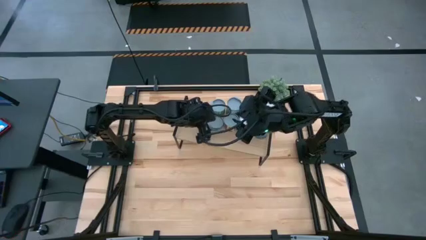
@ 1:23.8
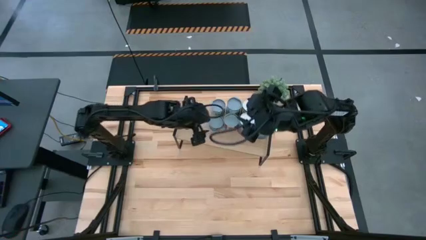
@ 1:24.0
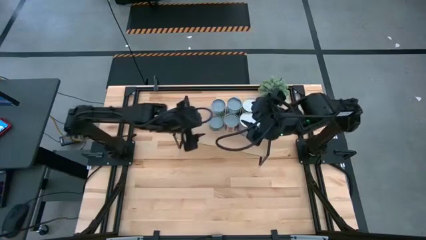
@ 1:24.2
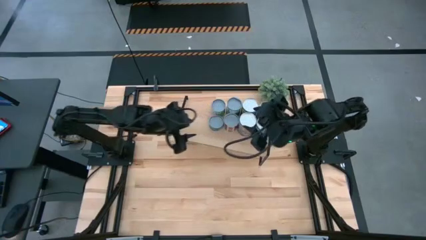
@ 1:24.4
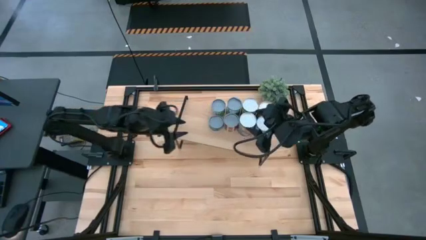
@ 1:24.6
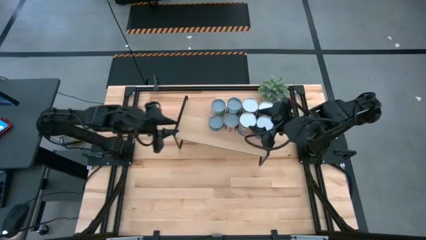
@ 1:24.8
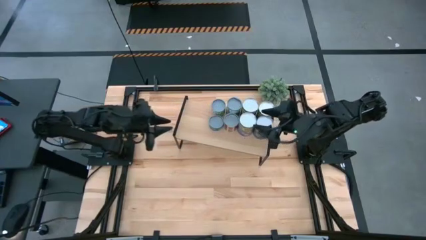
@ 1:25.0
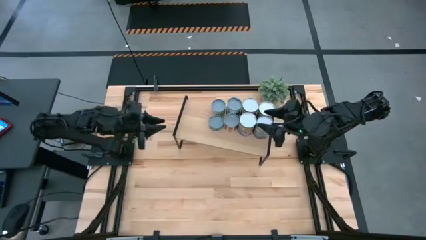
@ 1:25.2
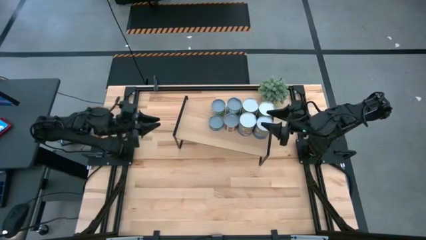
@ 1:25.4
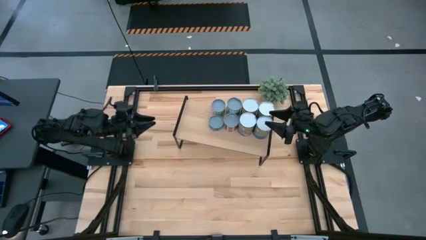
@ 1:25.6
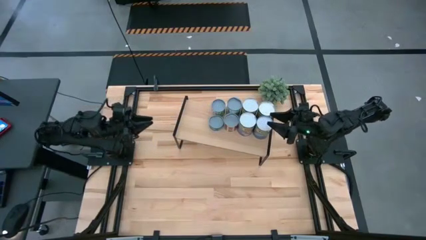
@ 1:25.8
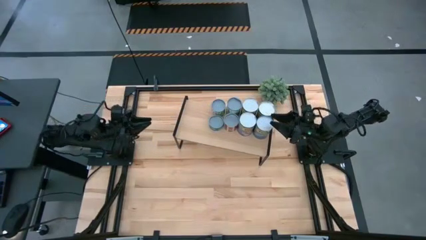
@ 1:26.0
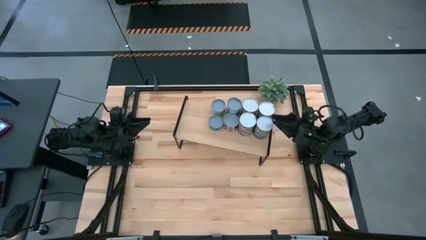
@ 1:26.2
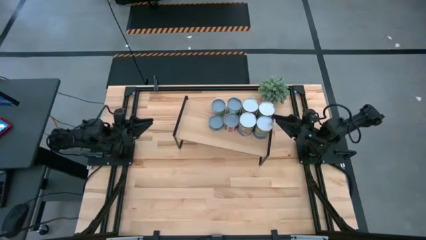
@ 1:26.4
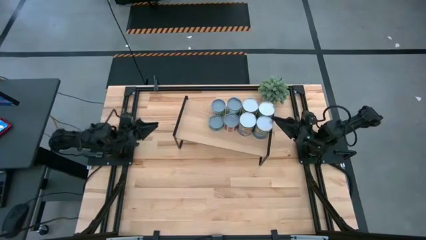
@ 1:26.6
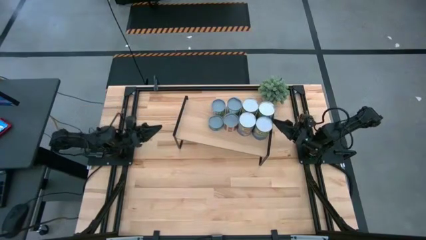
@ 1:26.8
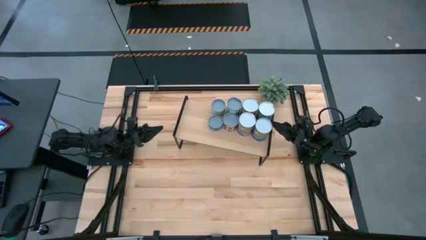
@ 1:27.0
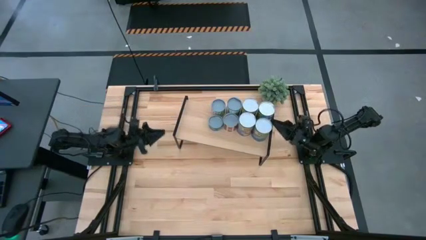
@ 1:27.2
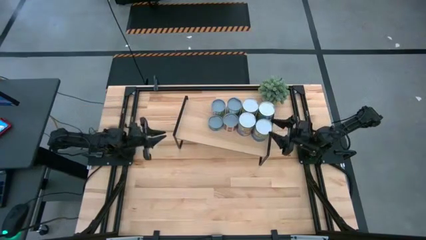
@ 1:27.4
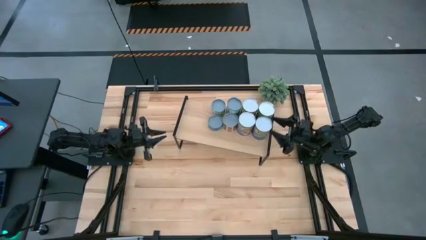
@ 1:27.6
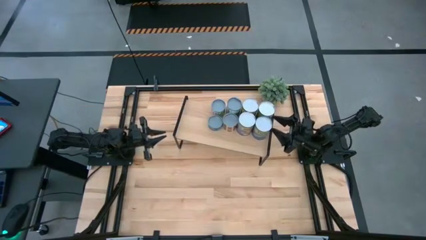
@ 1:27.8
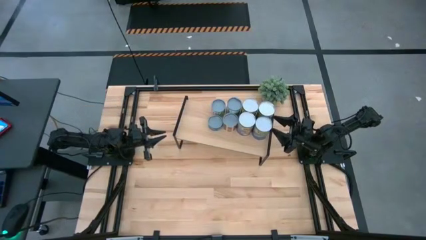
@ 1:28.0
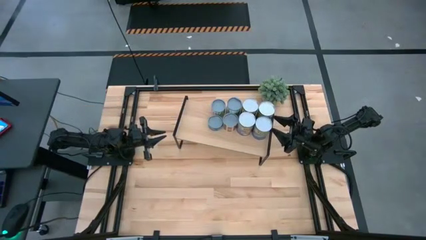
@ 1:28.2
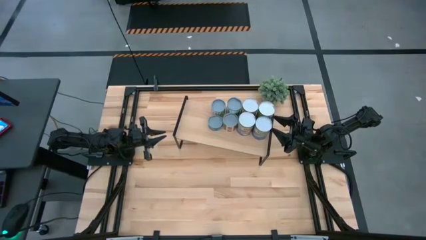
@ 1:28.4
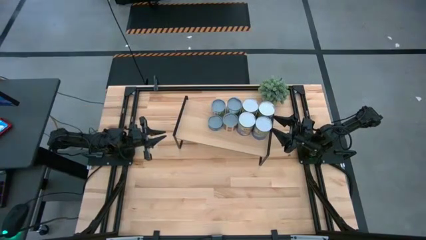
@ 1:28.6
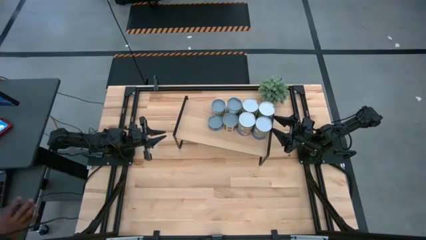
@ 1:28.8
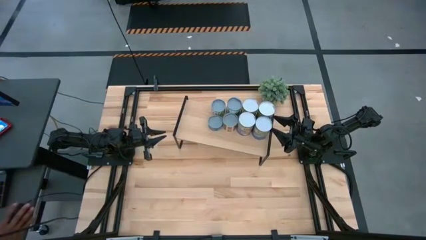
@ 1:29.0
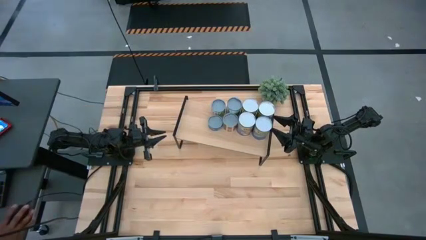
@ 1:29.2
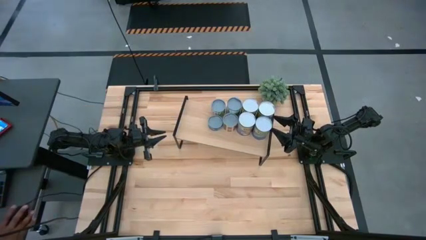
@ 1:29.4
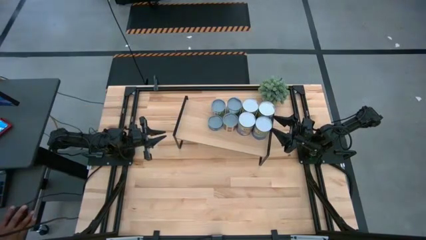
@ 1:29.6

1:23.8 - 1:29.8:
Task: Pick and place cans onto a shelf
Return to Home Position

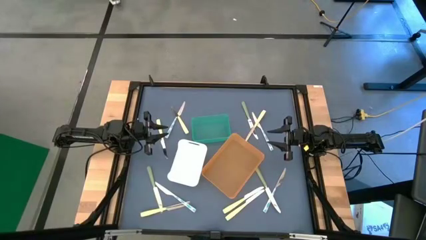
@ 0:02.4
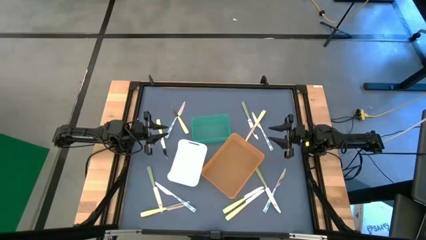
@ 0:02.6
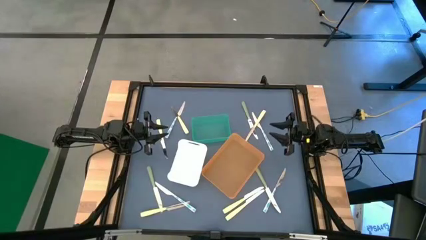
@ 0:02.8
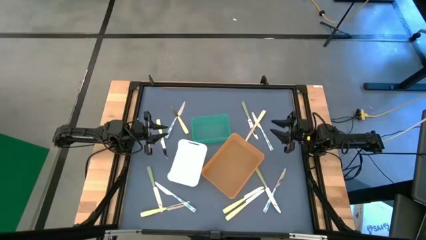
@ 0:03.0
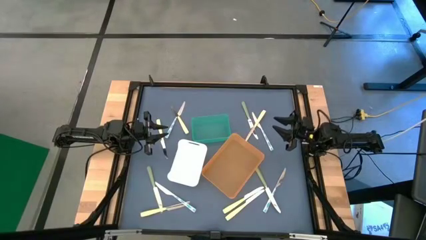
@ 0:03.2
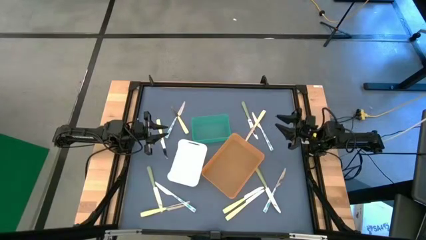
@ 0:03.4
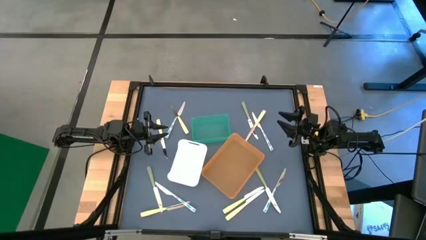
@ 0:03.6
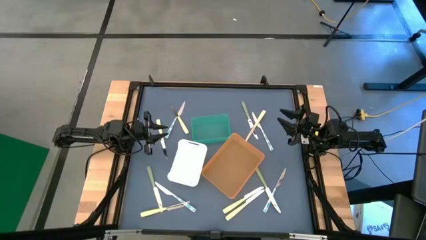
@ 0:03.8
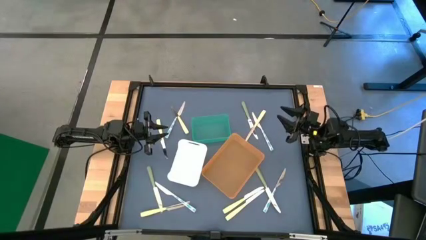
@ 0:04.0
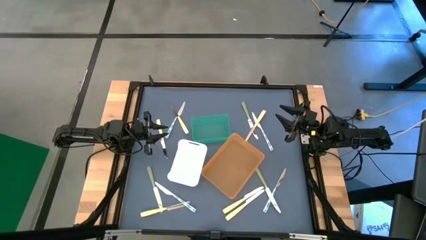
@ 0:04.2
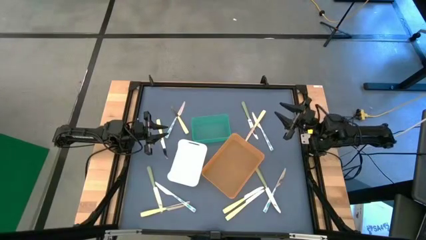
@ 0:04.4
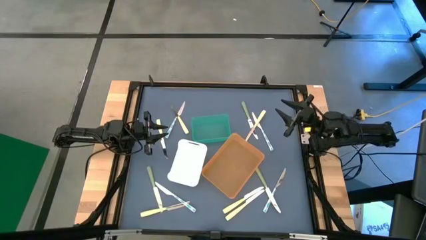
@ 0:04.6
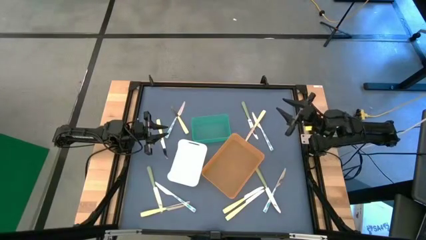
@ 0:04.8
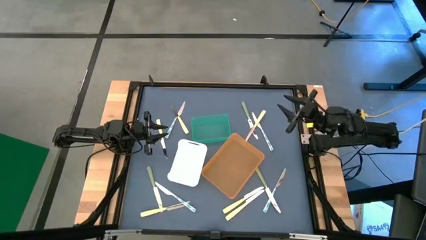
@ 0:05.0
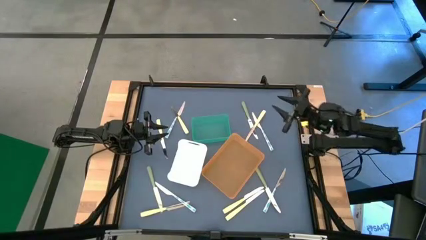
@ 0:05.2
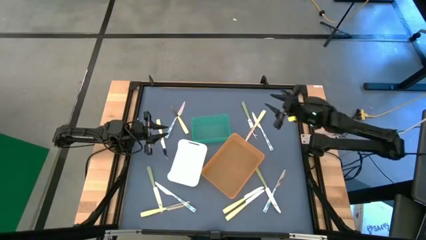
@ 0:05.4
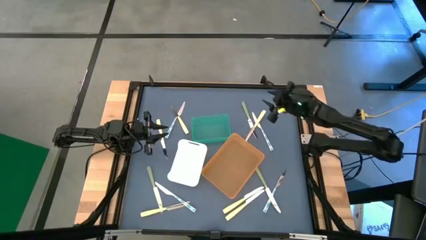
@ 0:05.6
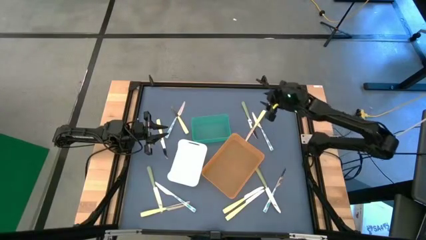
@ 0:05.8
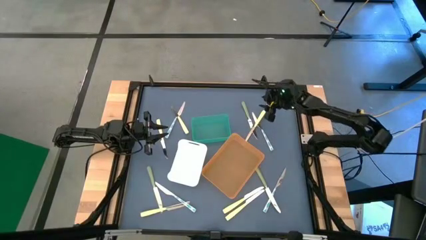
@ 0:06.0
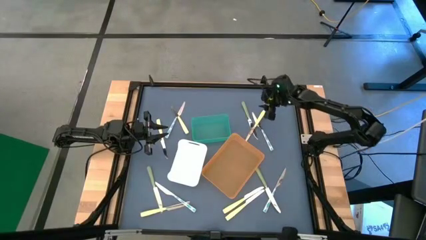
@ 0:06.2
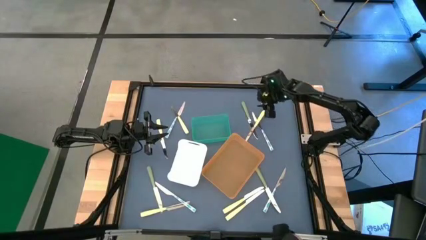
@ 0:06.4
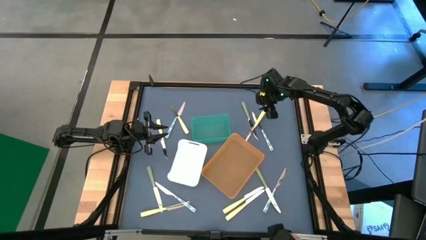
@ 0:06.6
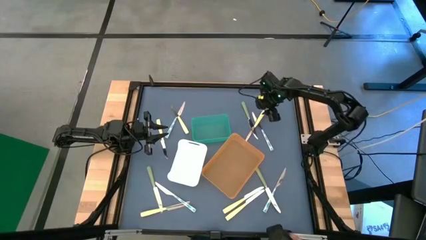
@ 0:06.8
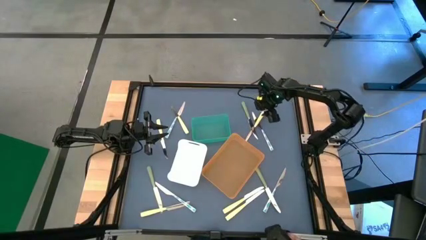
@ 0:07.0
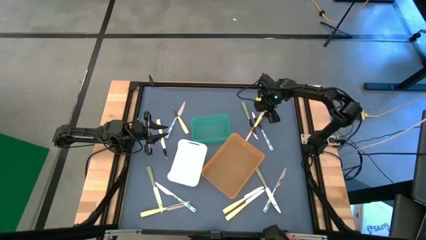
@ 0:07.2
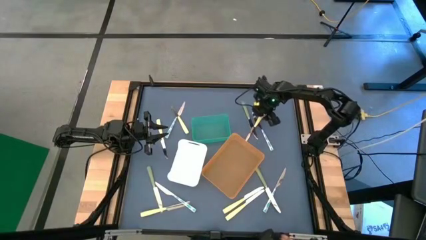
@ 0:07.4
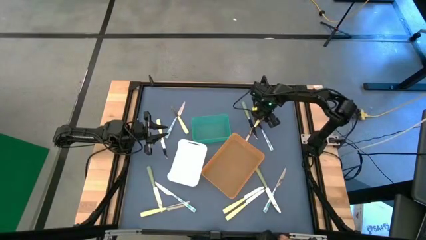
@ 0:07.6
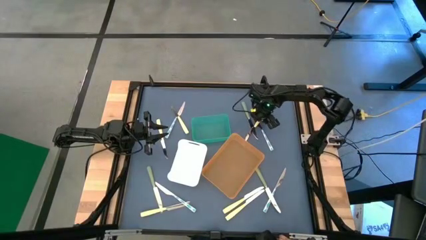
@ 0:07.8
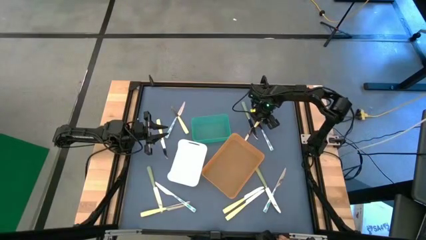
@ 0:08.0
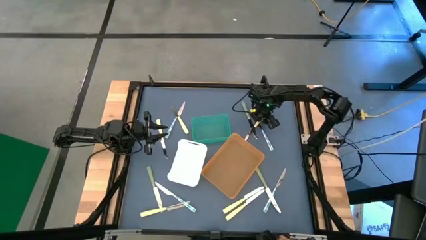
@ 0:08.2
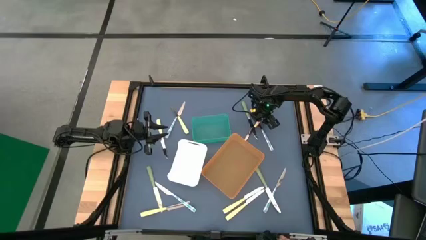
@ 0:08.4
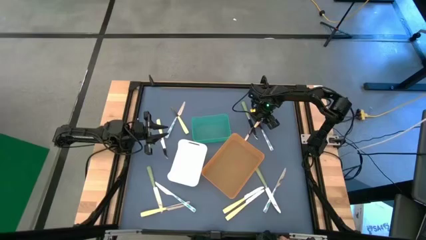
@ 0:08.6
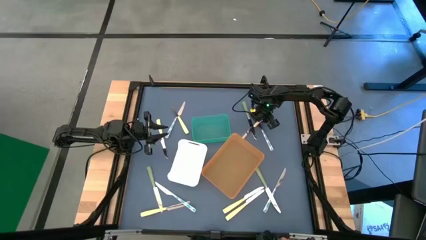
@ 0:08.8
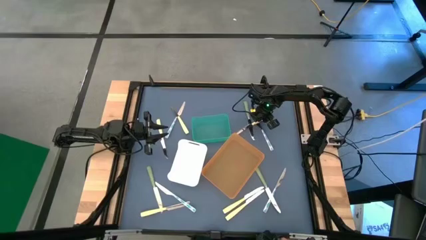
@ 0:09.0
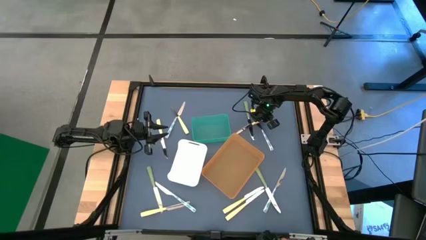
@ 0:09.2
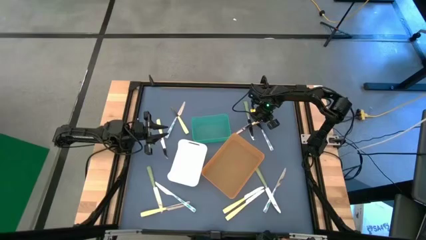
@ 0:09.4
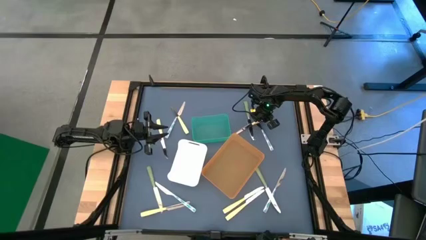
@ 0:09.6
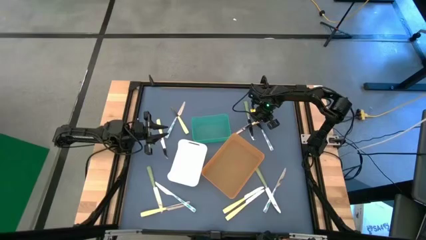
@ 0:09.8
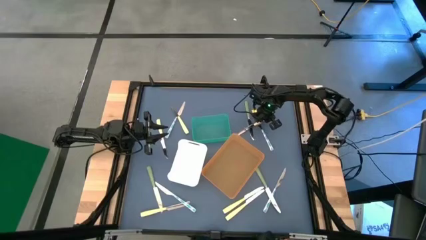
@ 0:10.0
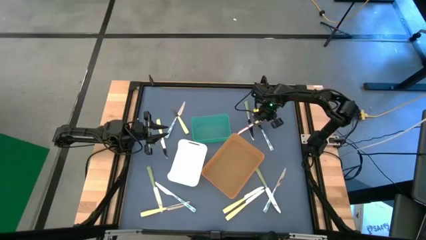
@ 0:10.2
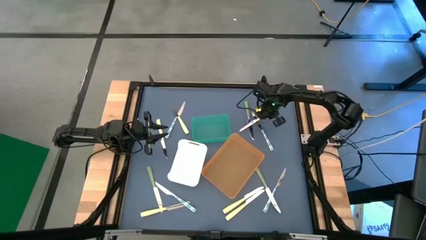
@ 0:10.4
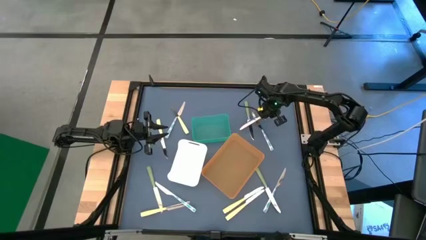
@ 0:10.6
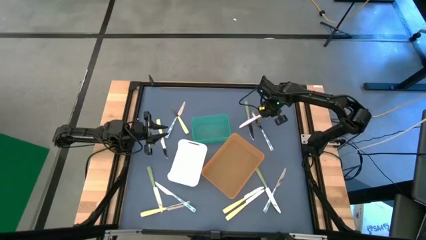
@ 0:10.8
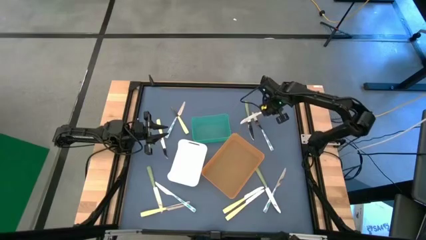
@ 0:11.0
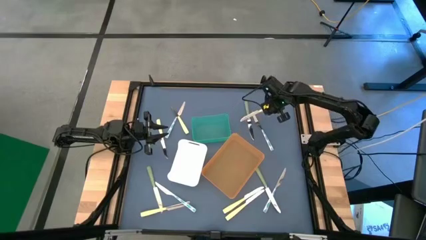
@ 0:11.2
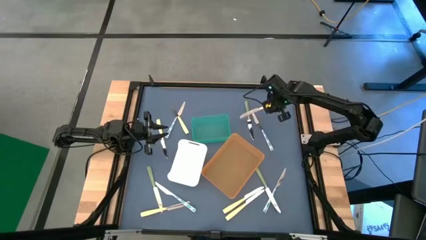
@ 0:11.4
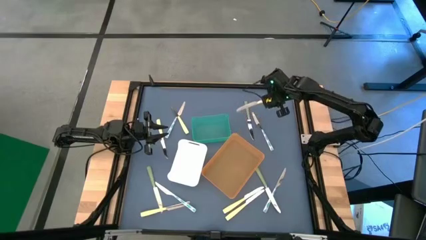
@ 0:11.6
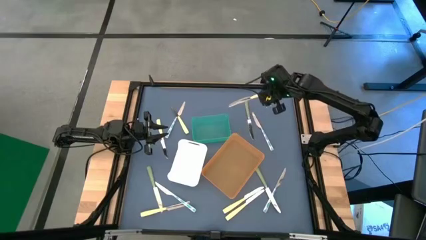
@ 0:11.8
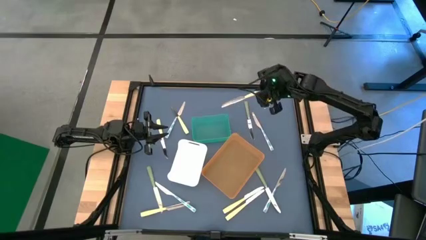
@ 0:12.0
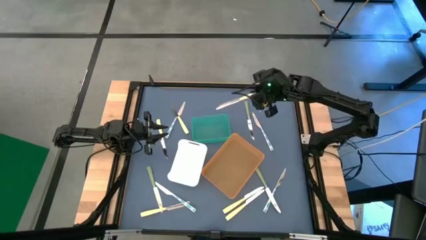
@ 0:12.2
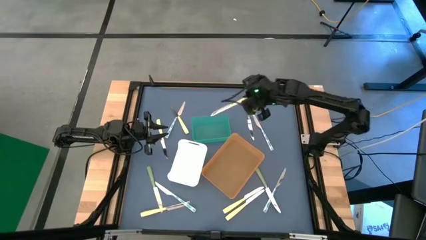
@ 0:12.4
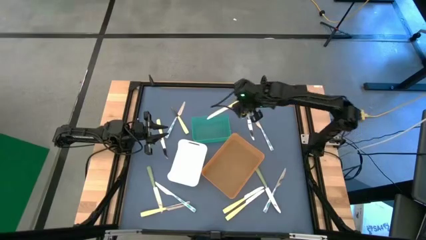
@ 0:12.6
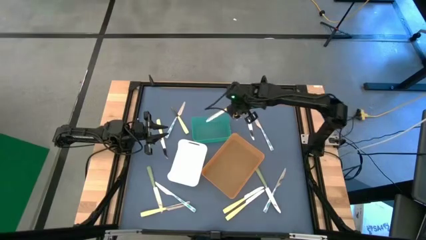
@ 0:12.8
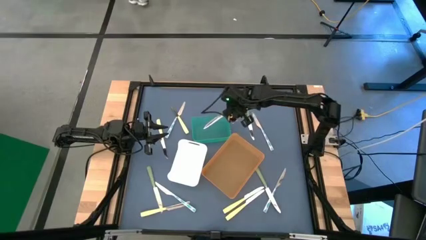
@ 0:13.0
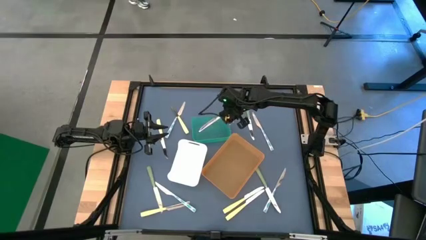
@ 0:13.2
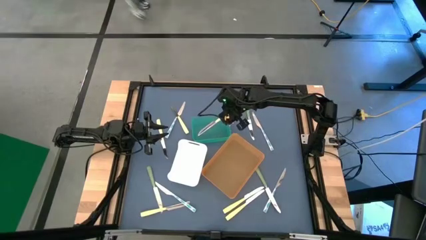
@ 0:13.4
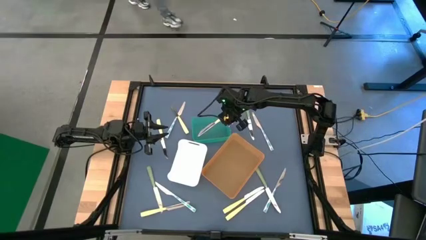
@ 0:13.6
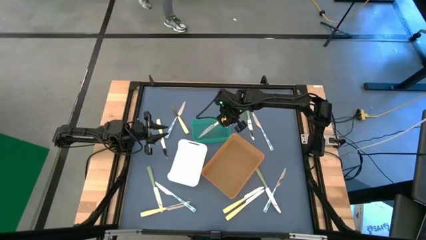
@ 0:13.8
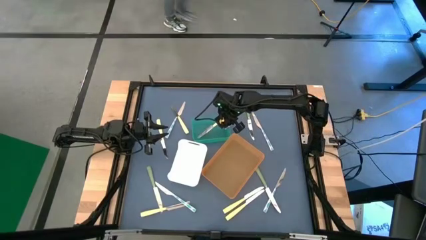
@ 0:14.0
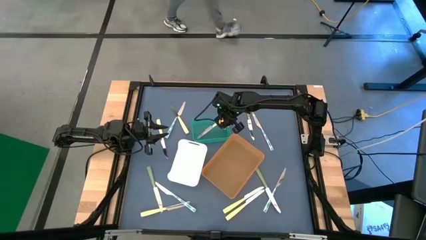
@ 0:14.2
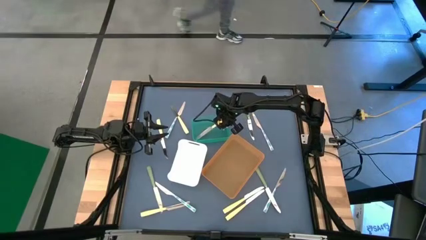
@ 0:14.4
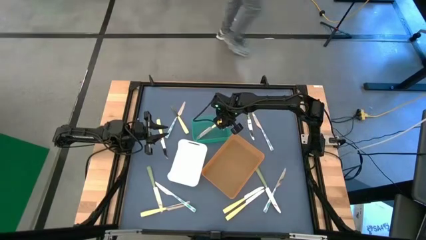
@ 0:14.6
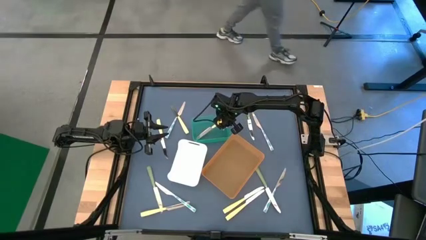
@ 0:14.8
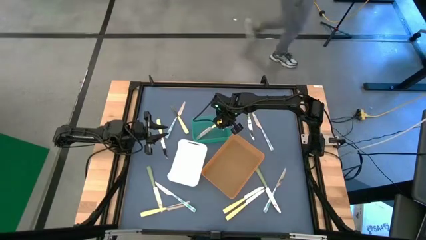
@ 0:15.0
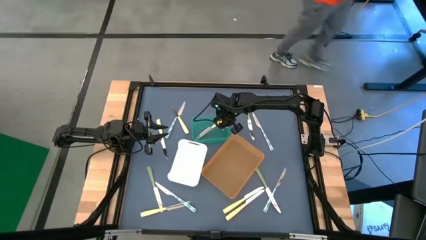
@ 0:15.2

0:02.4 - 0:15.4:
Task: Sort silverware by color (type)
Put the yellow knife into the blue bin
